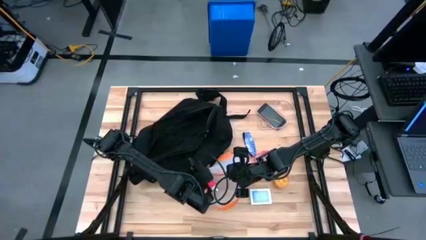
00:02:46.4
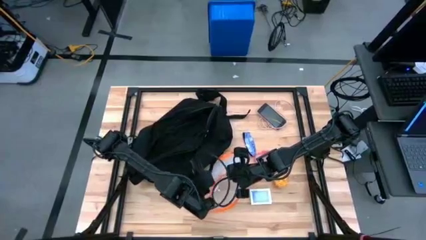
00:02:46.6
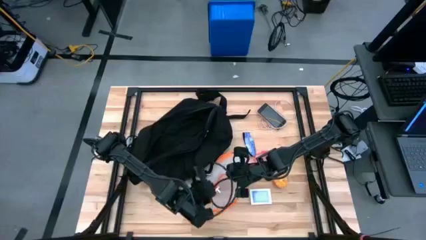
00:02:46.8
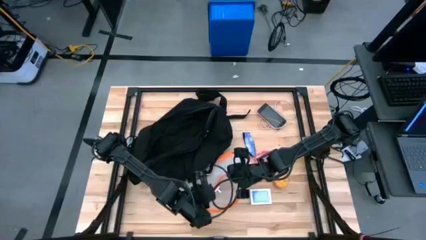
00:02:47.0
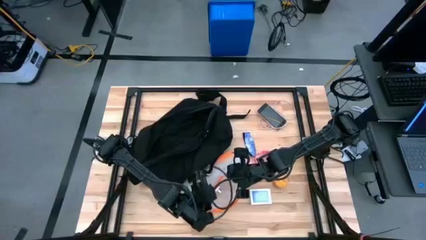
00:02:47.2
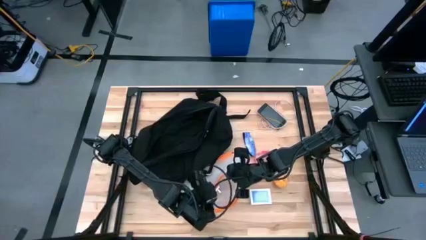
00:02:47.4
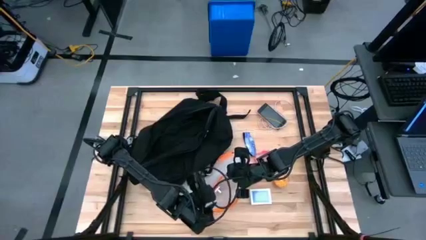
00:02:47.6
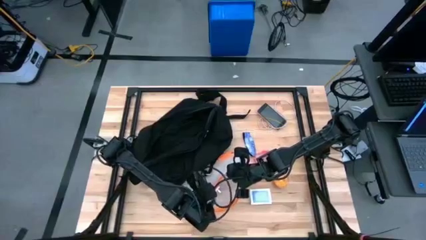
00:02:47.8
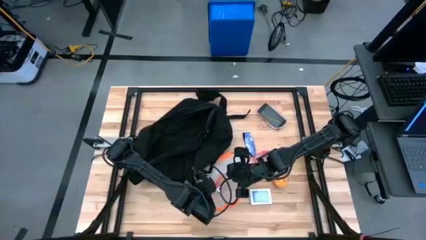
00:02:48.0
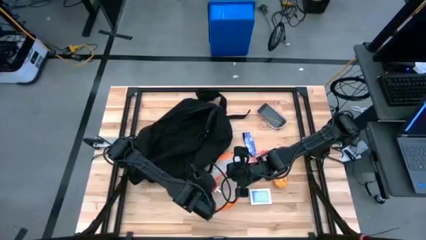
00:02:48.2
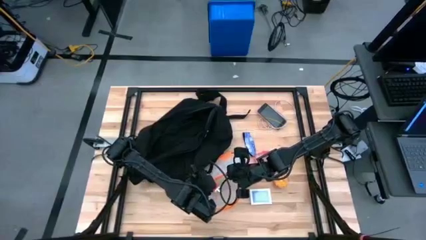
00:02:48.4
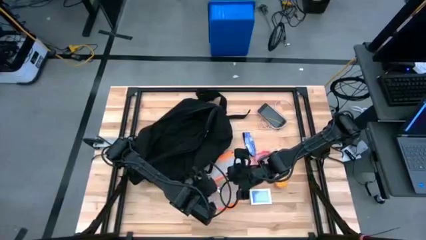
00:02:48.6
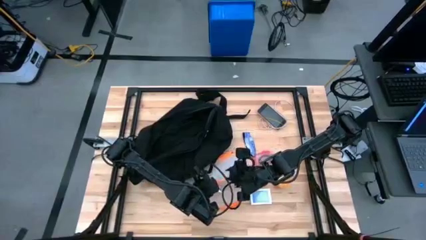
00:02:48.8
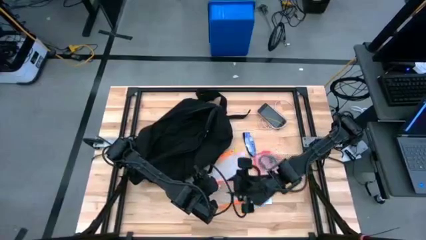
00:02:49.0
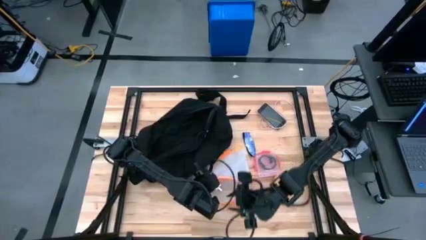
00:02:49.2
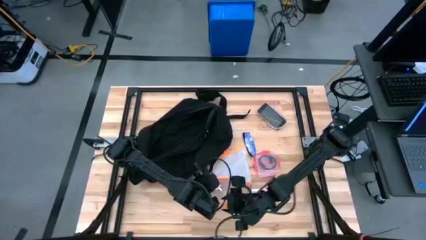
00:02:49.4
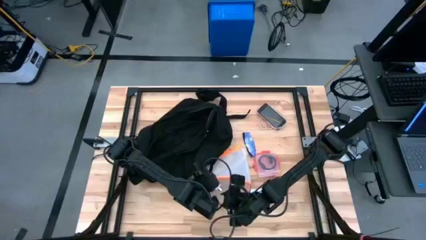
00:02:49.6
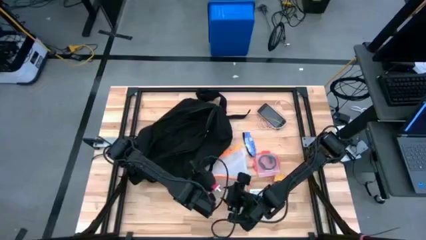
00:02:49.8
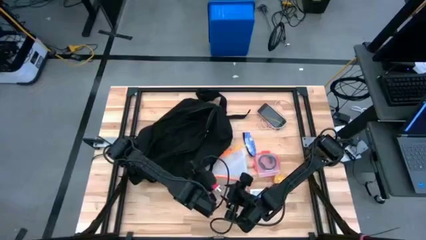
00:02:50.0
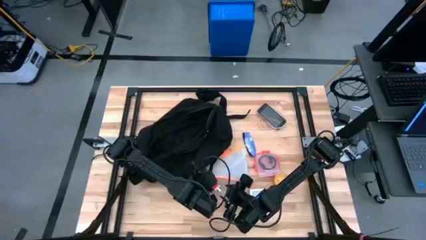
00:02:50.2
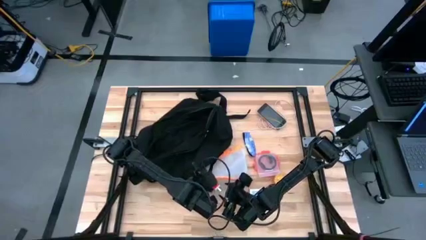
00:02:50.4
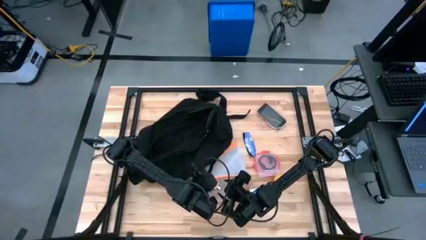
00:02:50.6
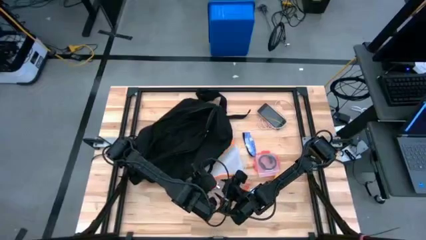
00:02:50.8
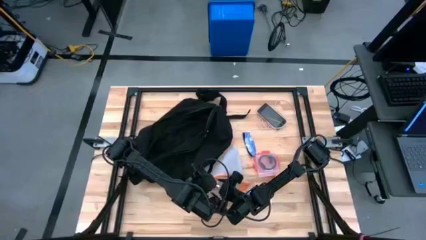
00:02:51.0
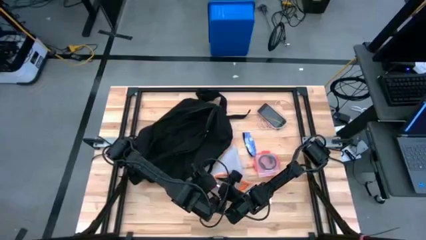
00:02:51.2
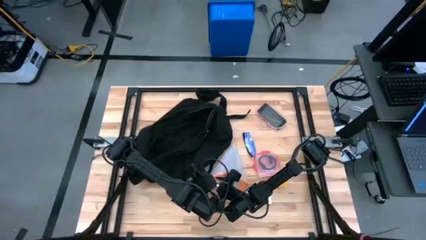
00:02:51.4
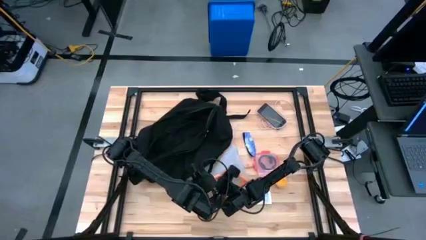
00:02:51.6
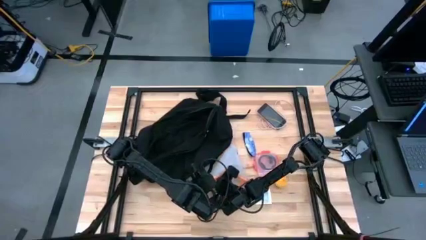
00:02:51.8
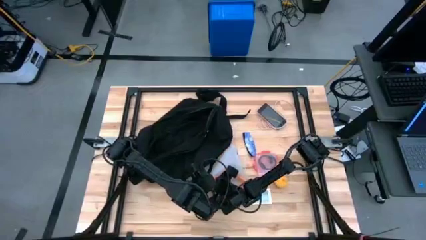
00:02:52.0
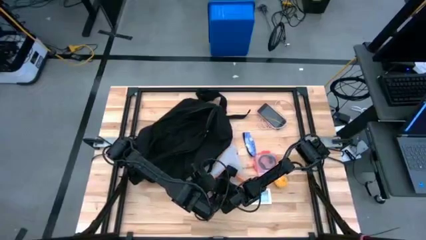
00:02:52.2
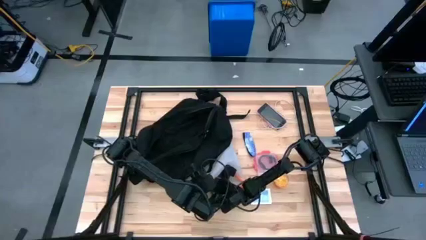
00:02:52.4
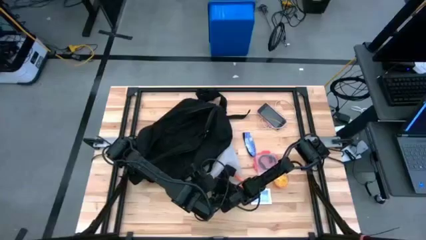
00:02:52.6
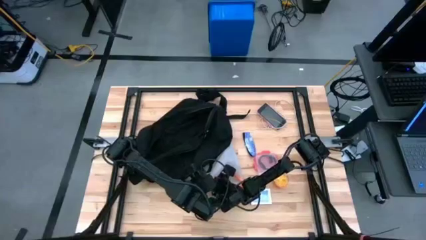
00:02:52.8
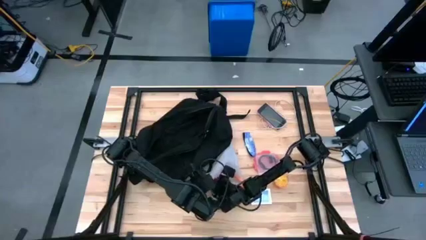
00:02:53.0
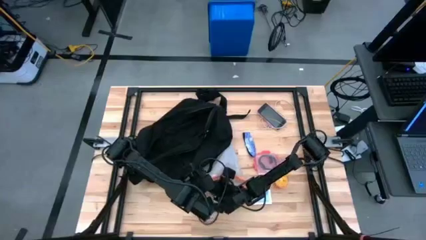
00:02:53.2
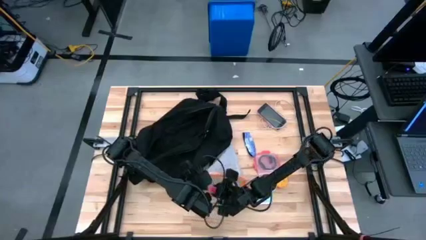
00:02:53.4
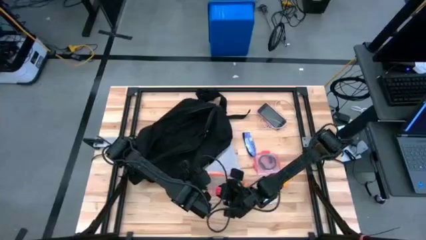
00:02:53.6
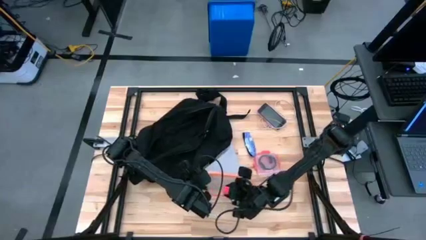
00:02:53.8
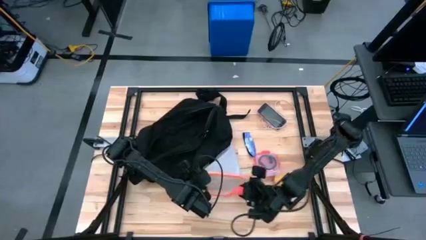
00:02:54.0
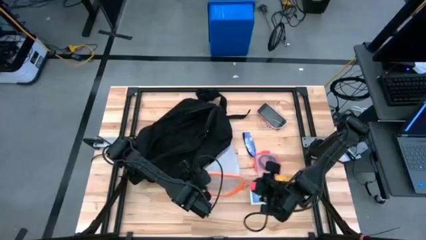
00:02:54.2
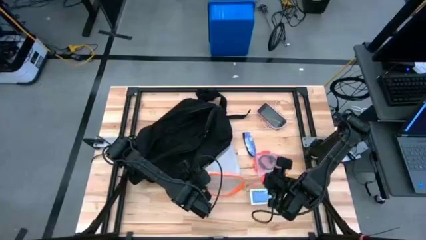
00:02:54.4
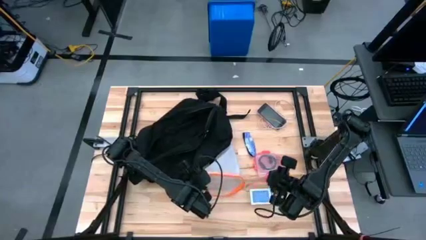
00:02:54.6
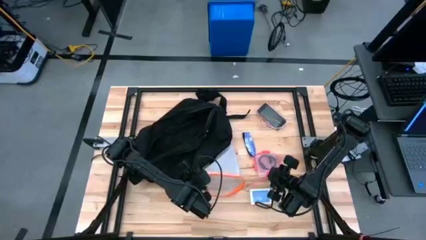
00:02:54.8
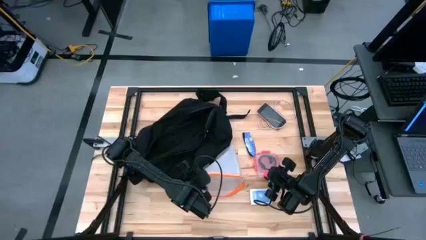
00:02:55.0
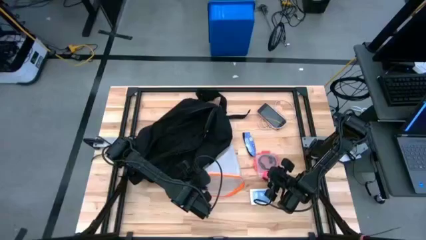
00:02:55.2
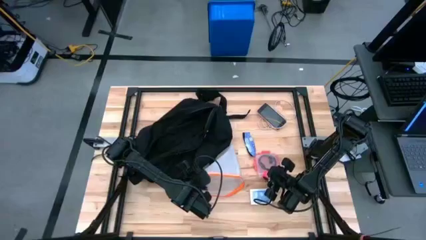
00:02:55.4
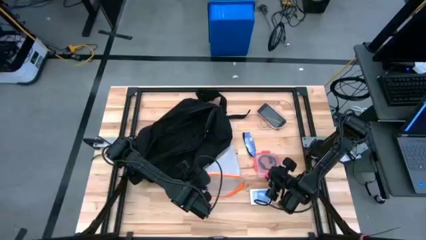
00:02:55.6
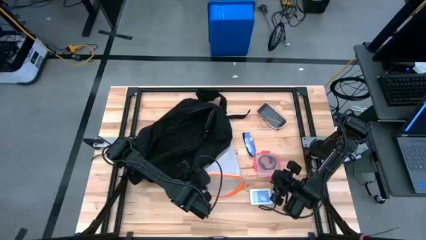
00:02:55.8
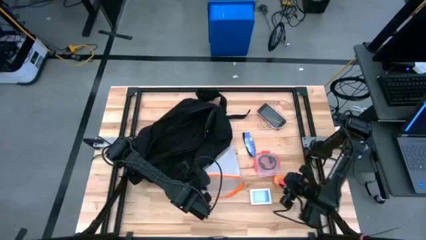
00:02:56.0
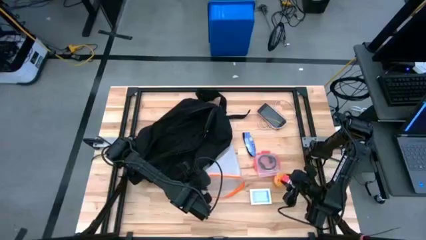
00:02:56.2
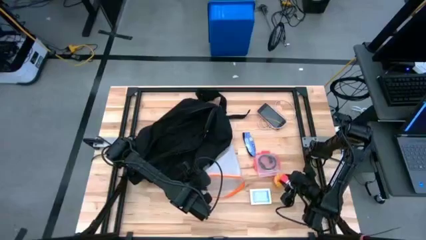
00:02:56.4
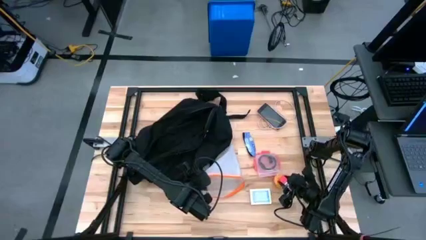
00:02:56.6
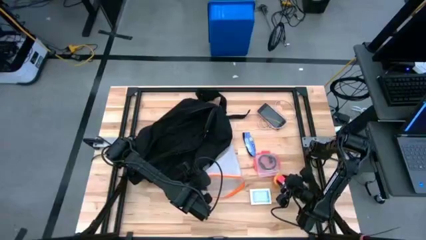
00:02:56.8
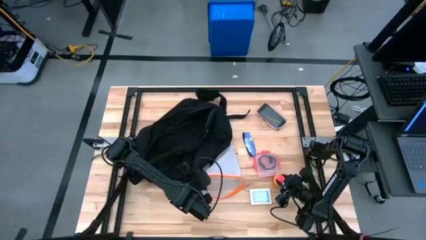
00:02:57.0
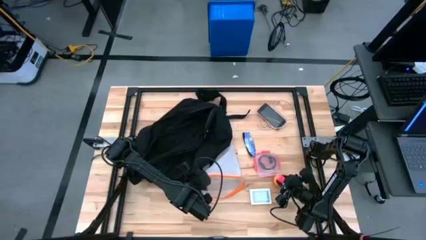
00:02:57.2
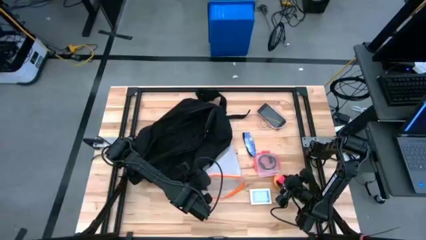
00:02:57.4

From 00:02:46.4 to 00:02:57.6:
Task: Unpack backpack
Remove the pink charger adapter from the orange zip bag

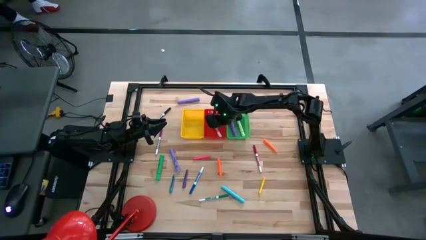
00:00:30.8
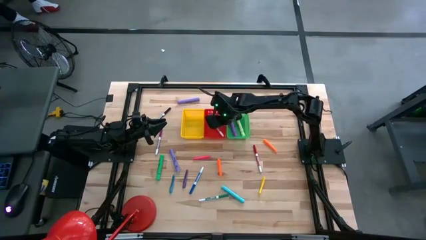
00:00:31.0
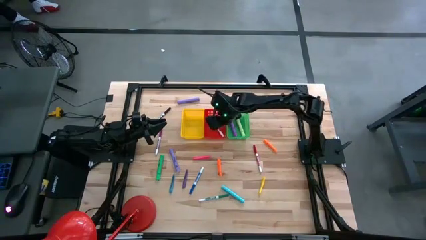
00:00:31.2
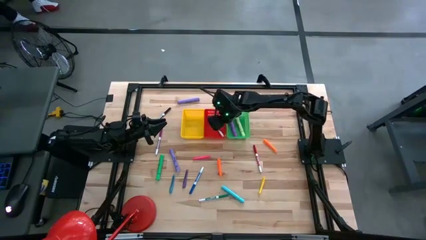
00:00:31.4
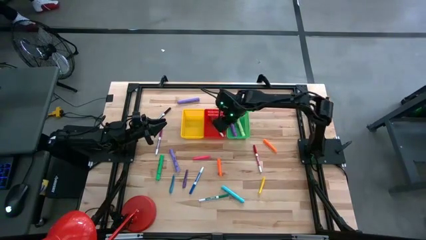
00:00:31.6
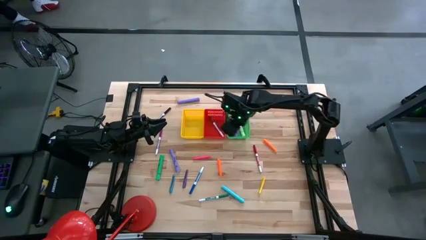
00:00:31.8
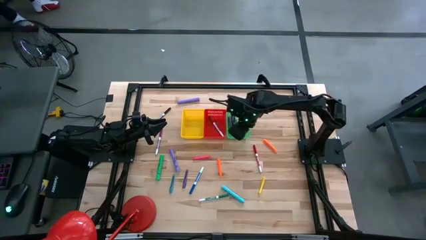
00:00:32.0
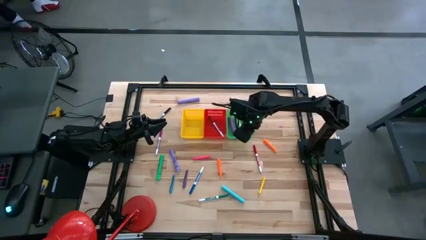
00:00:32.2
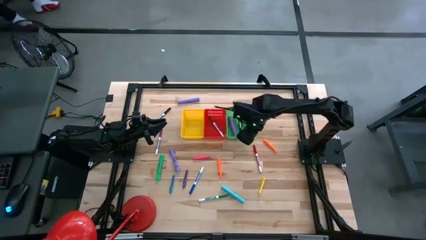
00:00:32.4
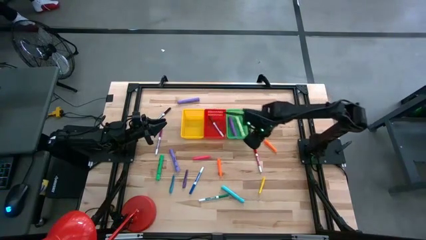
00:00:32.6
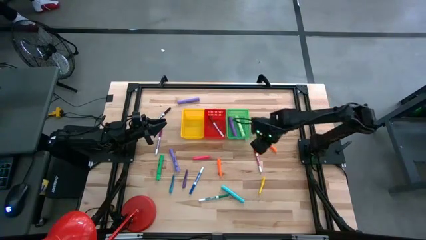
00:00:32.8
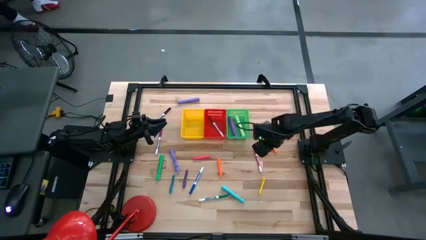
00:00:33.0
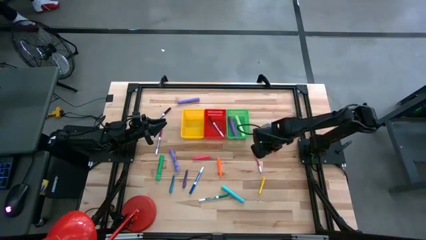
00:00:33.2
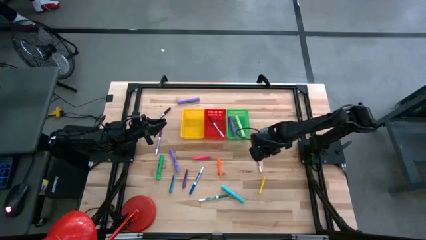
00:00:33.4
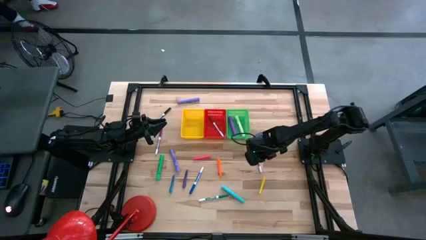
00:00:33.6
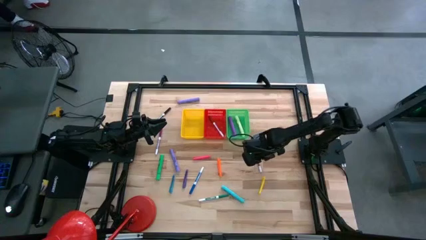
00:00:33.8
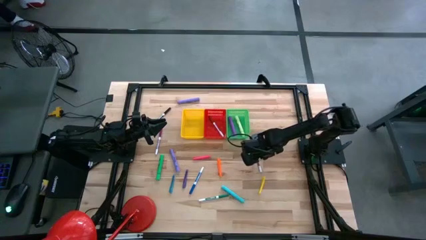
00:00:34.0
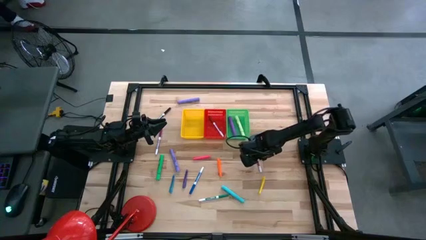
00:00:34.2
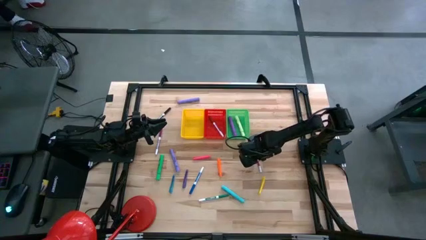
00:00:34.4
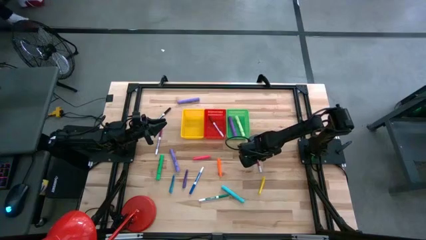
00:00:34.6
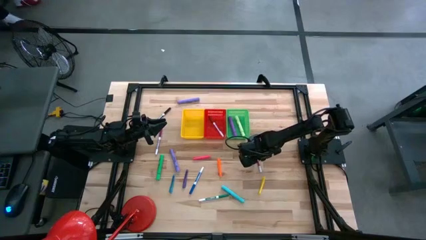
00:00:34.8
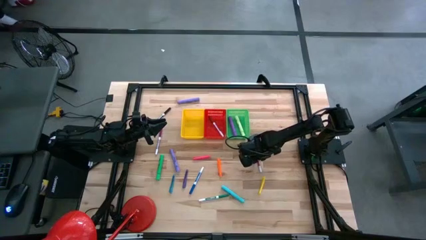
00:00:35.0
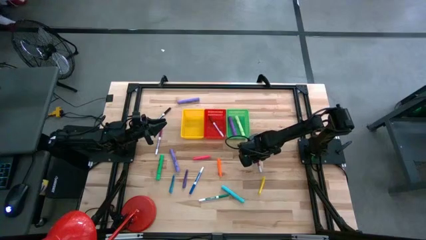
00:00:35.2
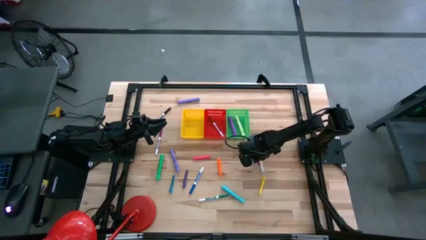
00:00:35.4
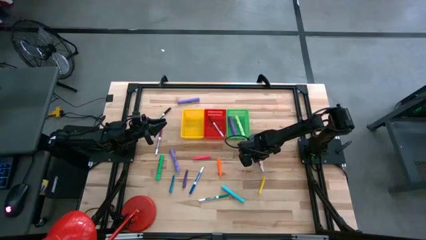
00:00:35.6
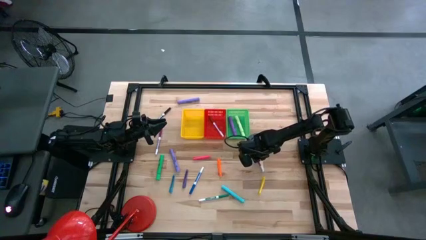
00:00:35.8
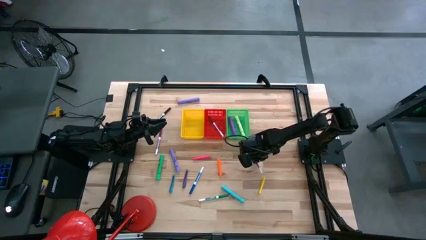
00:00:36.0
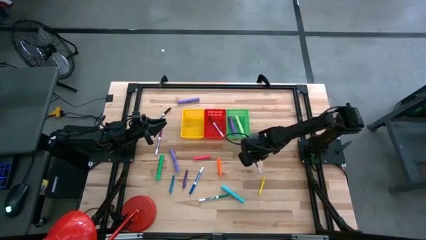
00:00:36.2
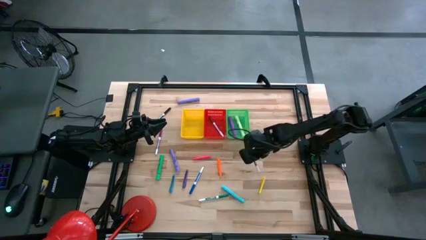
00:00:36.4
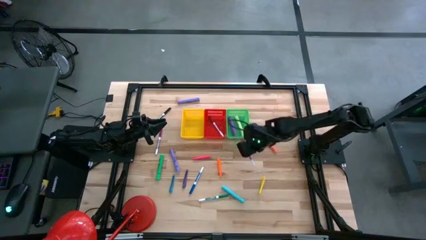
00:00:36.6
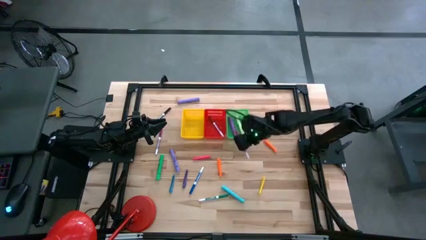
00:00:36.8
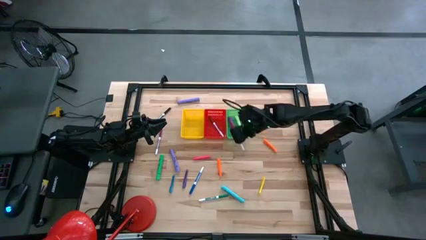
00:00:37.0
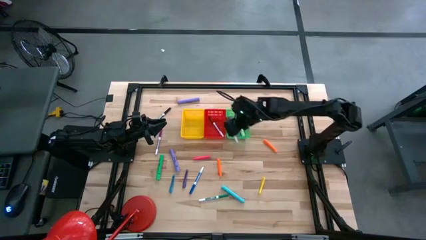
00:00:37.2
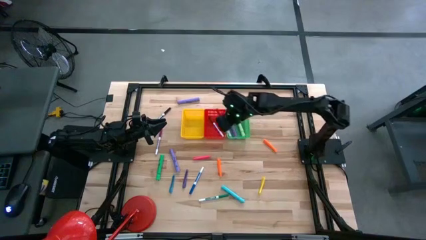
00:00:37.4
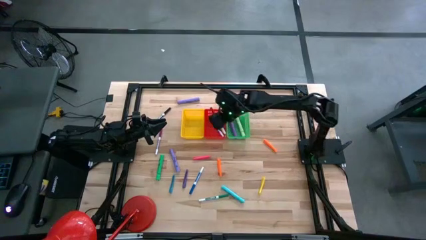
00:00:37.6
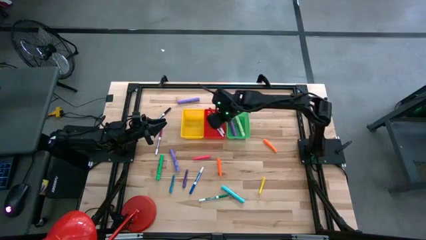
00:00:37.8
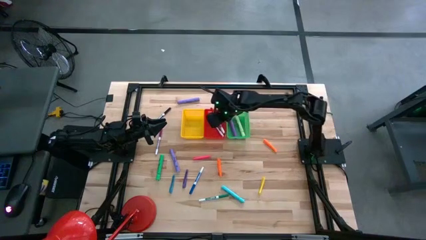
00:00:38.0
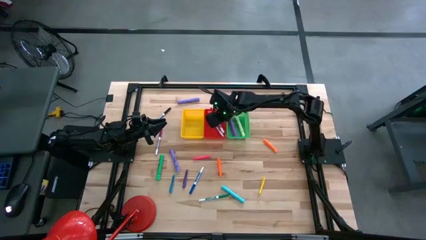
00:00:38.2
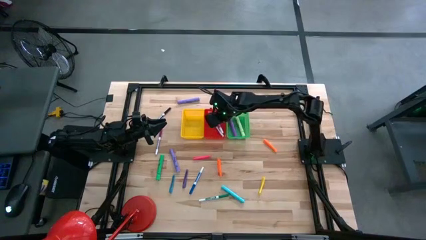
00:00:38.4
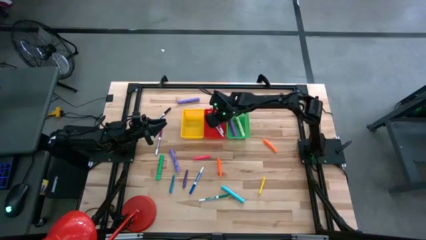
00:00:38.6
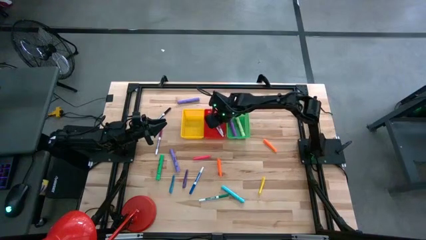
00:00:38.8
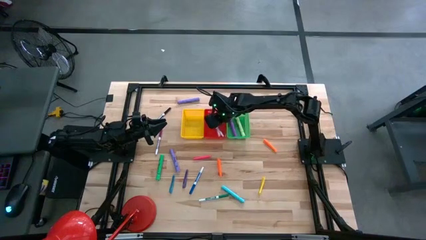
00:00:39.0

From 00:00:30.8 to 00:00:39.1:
Task: Pick & Place Markers
Put the red marker into the red bin
